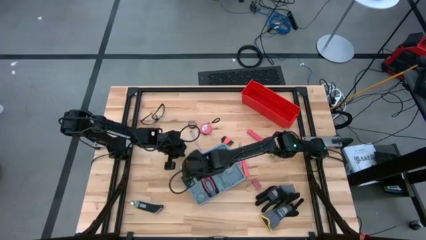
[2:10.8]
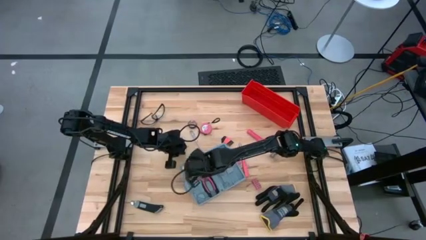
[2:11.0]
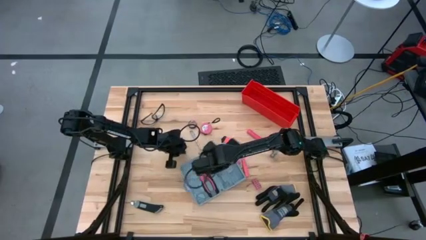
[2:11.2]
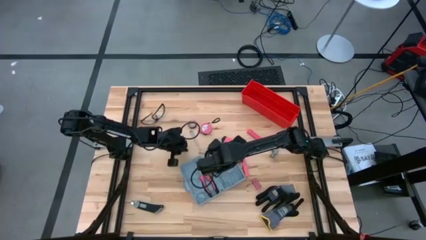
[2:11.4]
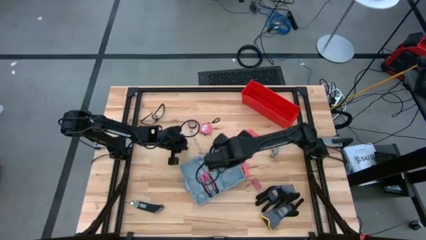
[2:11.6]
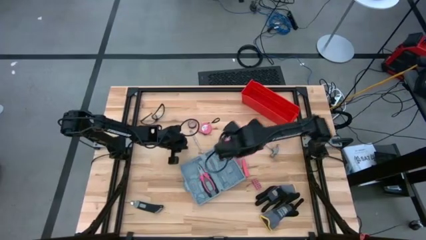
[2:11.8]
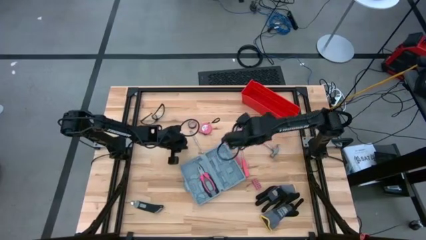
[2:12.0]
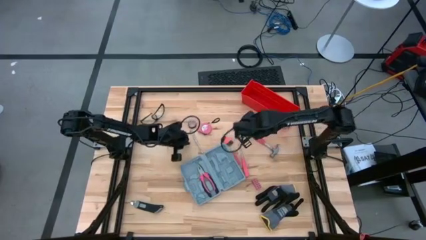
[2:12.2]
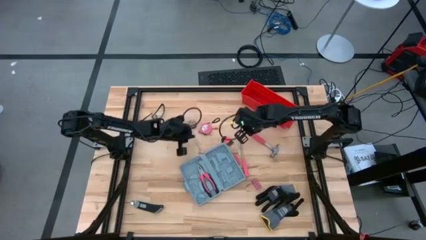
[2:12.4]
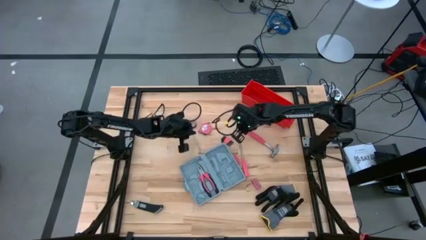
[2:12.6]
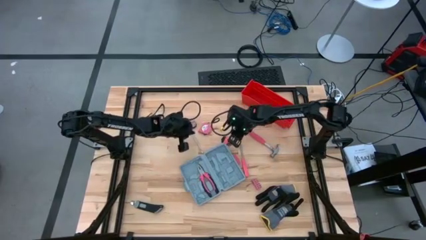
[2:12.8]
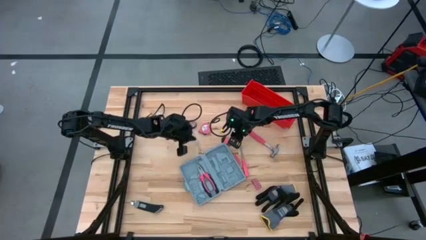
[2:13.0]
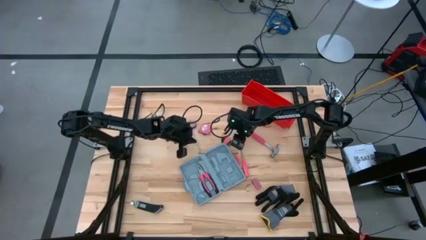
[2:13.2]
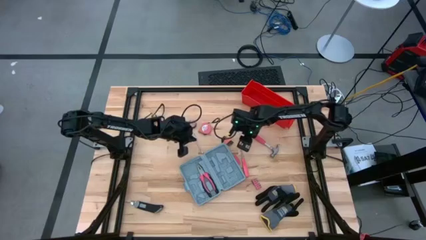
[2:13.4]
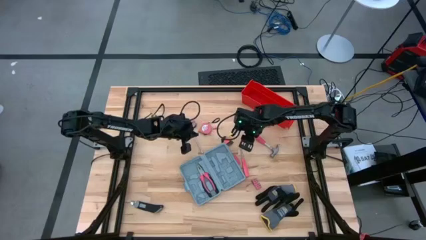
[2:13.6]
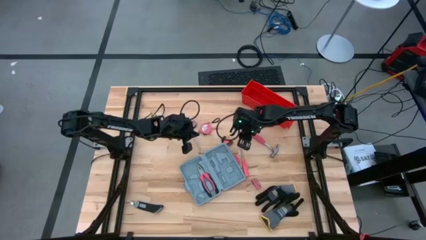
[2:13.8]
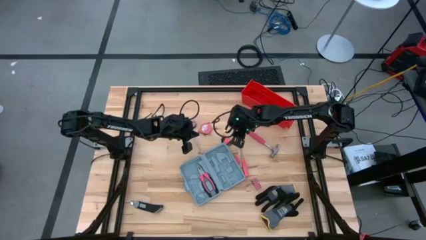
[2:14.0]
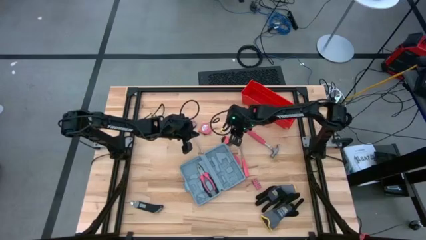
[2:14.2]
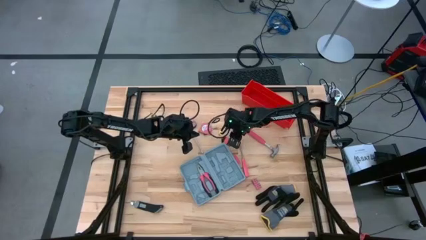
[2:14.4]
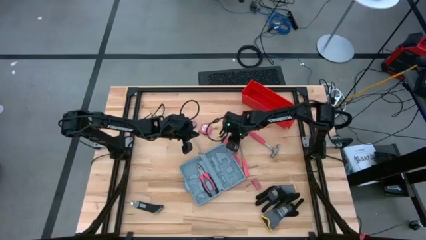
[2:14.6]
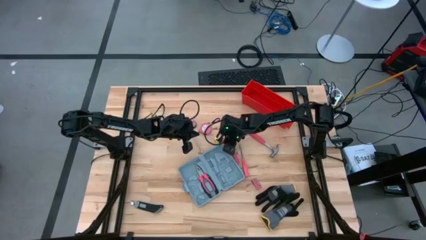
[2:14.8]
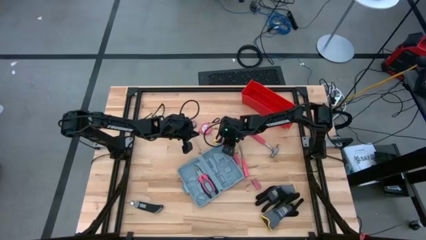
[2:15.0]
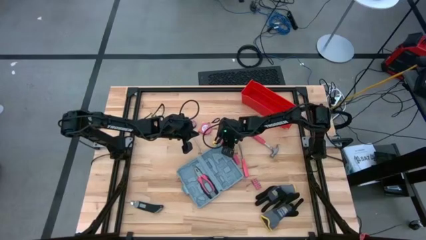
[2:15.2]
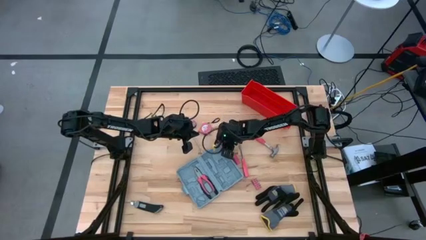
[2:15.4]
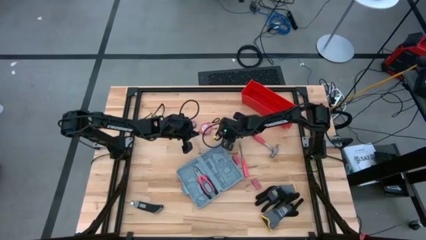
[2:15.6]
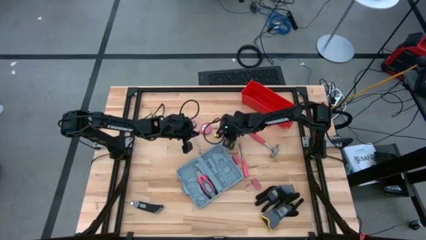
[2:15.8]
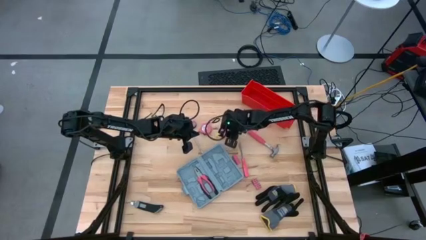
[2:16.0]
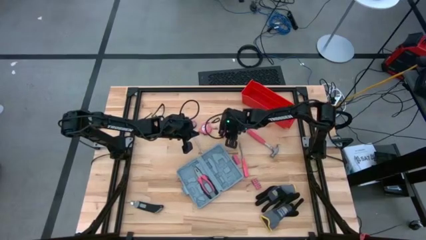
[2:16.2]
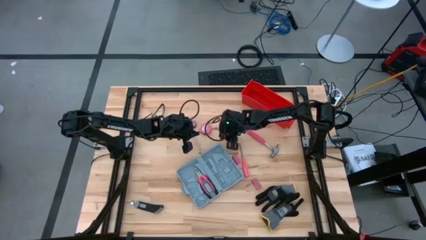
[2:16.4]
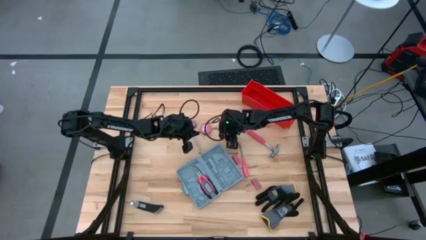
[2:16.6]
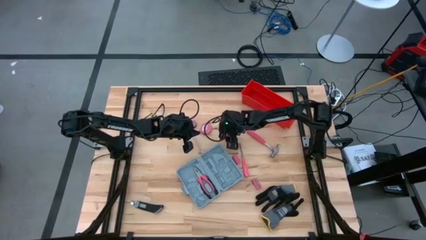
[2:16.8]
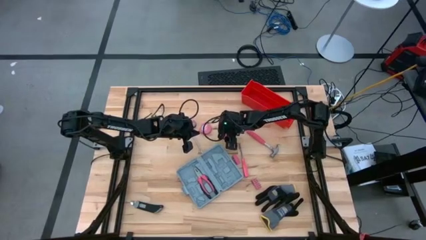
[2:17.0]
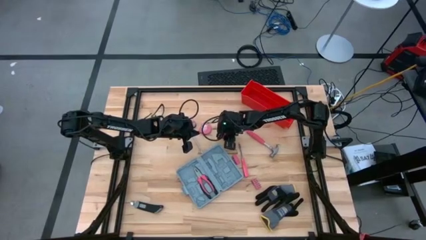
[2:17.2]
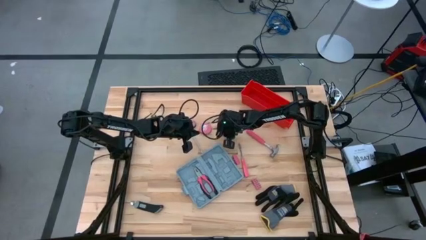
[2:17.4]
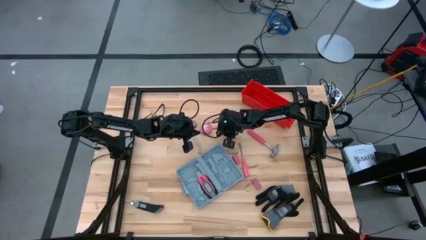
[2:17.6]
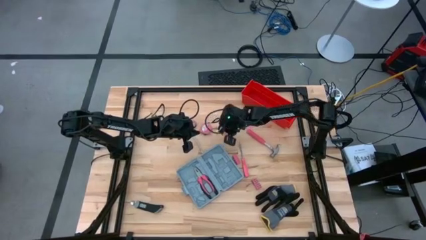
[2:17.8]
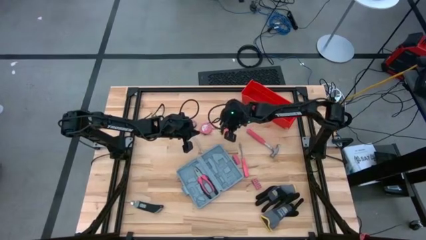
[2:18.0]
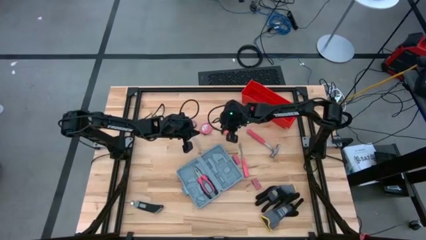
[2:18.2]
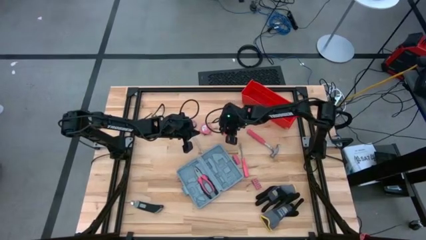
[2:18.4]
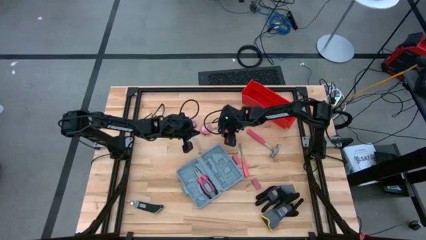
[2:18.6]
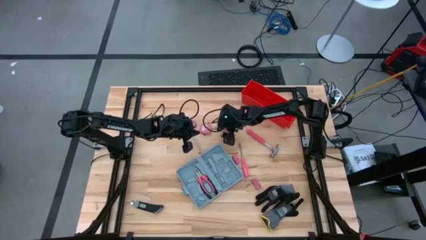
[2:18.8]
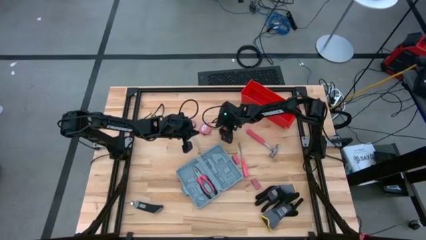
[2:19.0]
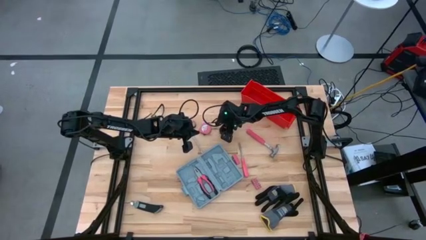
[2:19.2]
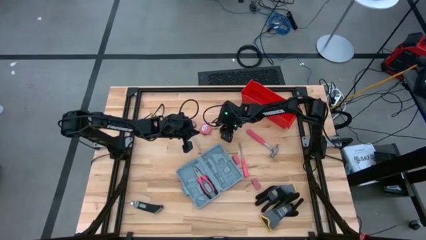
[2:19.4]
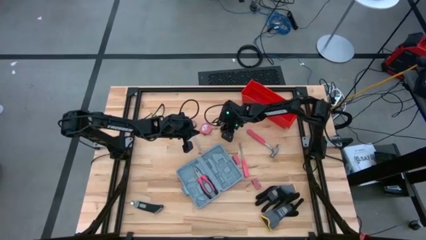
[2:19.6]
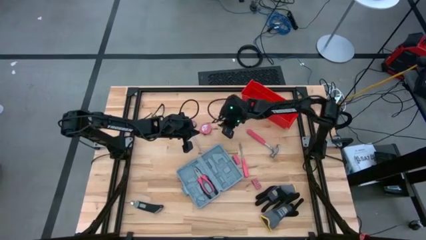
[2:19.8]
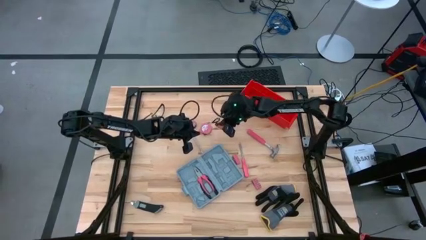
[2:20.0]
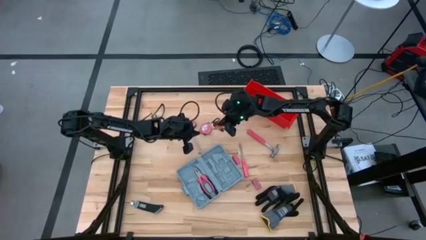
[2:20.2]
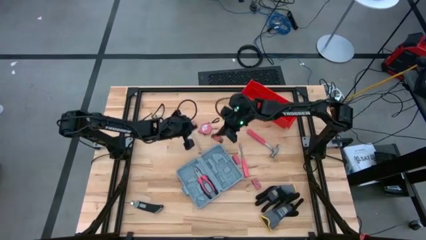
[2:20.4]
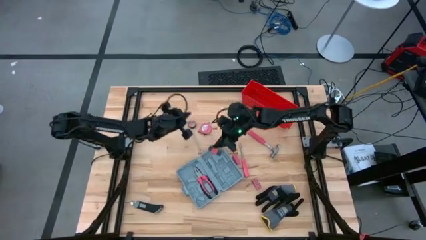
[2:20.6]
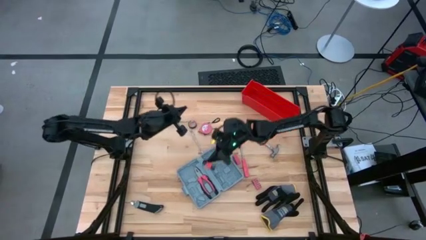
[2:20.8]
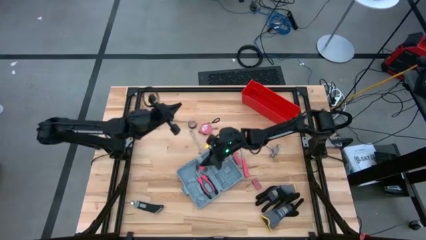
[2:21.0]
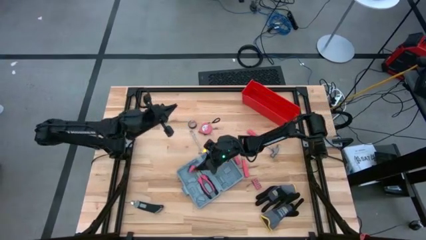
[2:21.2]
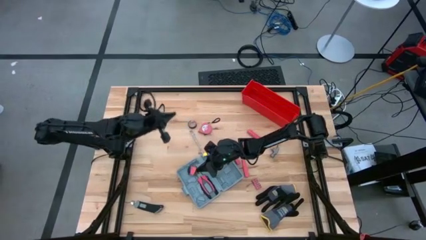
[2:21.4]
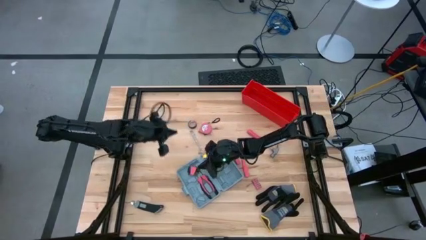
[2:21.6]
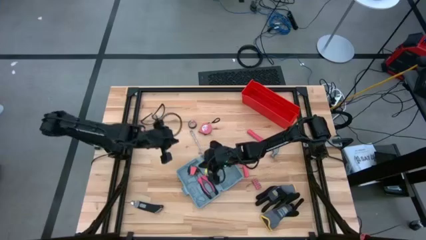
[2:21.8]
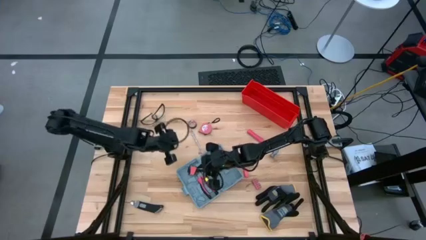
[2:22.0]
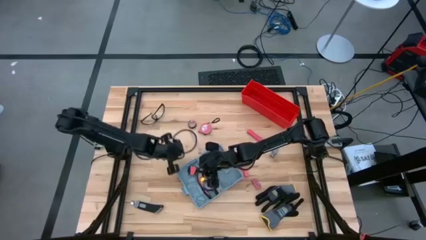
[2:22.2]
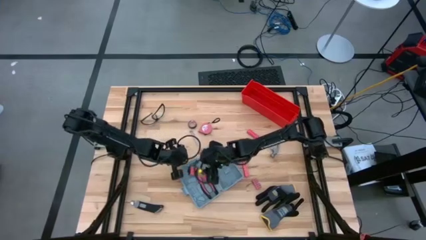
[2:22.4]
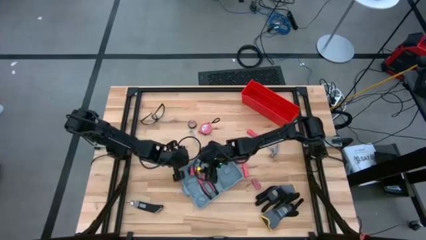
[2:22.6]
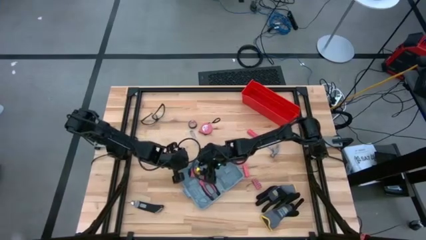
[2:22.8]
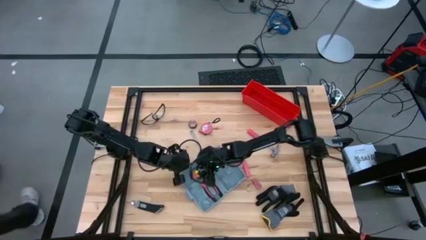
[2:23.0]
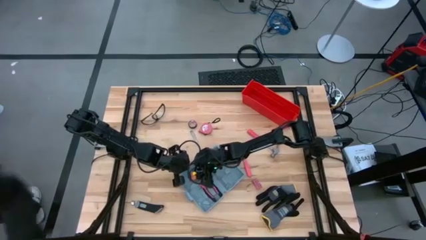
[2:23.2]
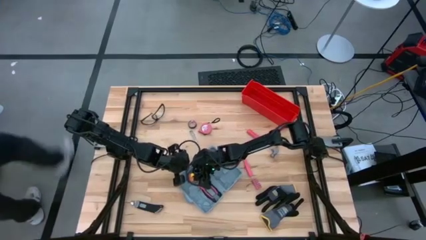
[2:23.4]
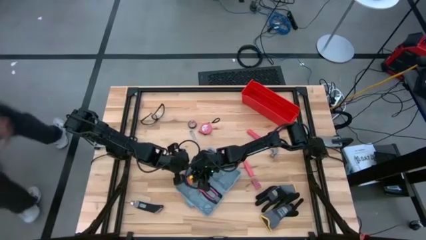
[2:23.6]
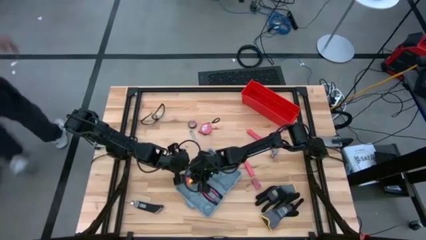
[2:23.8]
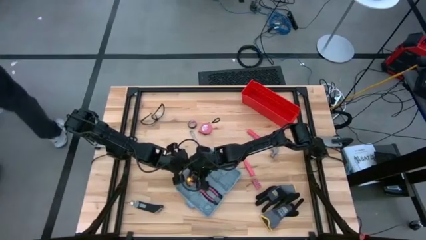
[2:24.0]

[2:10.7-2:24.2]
Task: prefit tool cases
Put the hex key set into the toolbox

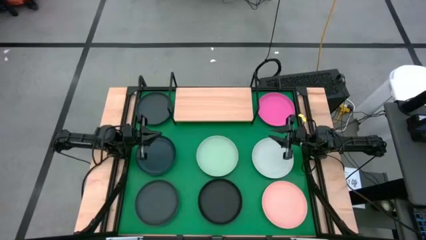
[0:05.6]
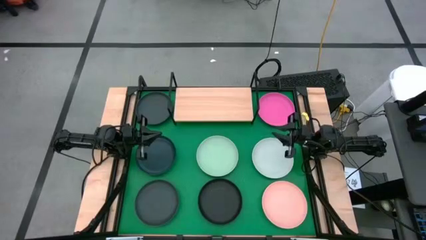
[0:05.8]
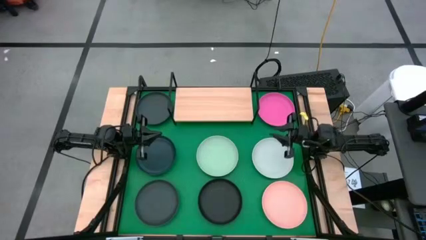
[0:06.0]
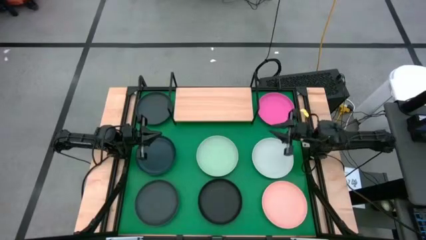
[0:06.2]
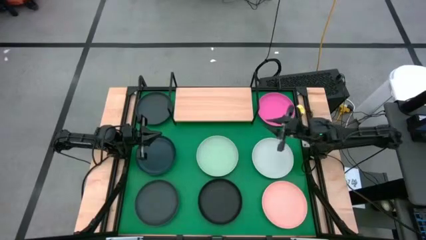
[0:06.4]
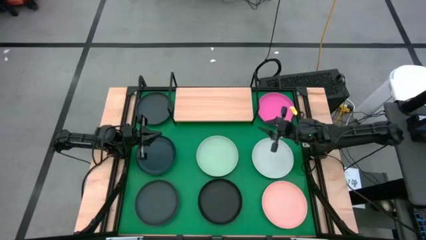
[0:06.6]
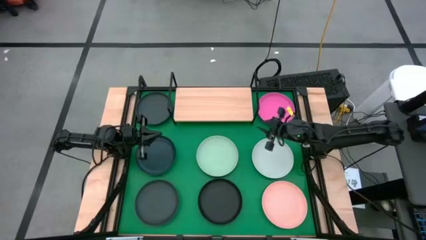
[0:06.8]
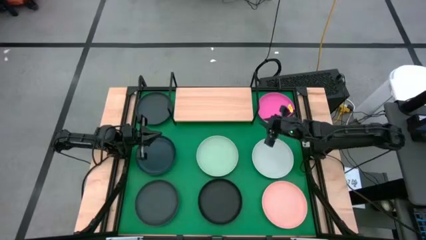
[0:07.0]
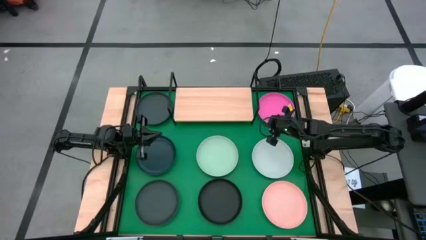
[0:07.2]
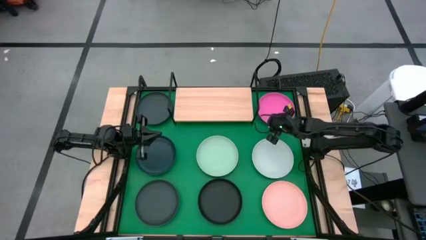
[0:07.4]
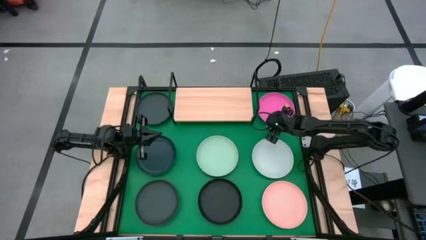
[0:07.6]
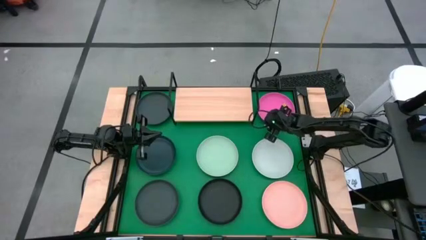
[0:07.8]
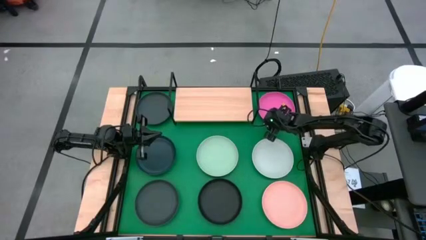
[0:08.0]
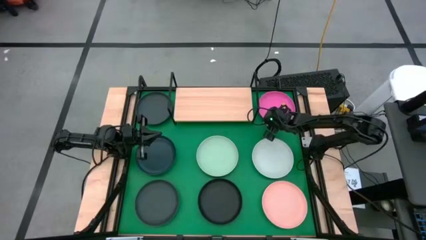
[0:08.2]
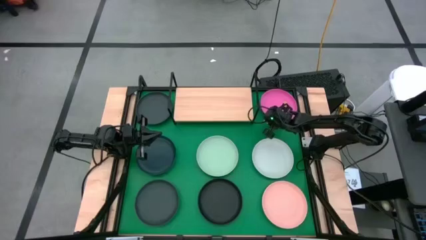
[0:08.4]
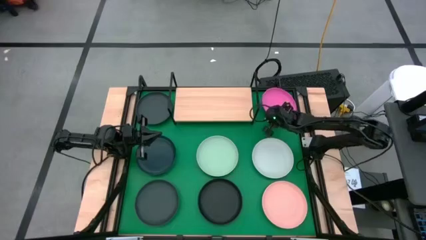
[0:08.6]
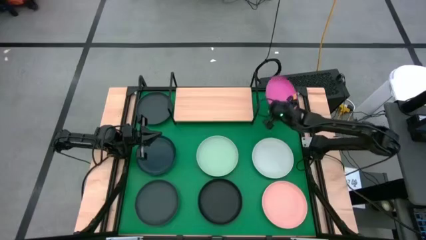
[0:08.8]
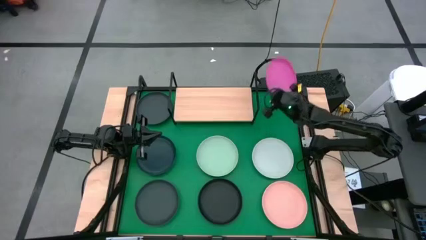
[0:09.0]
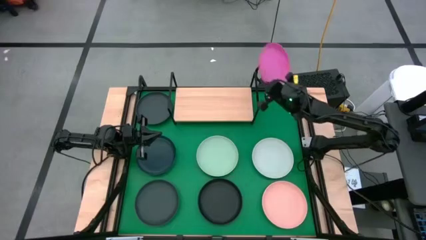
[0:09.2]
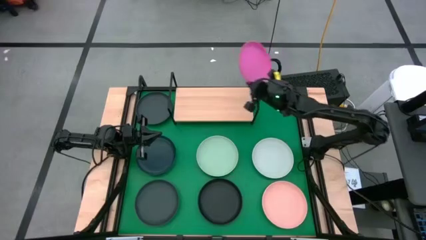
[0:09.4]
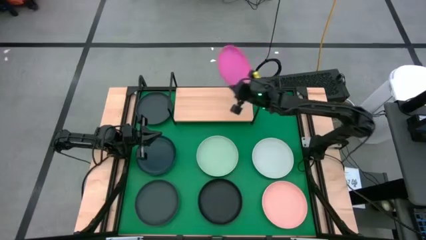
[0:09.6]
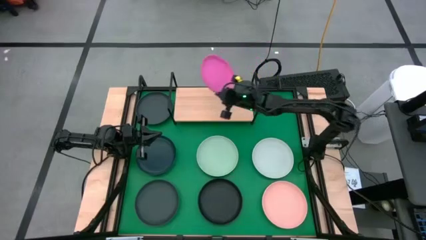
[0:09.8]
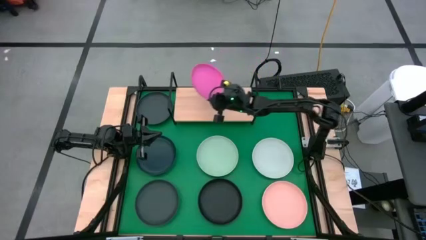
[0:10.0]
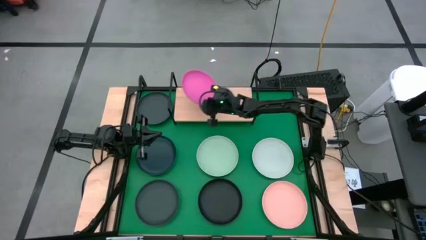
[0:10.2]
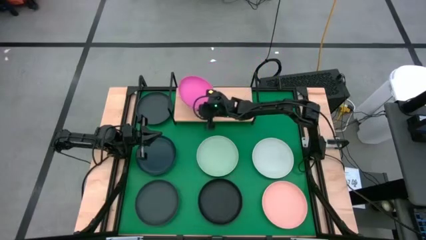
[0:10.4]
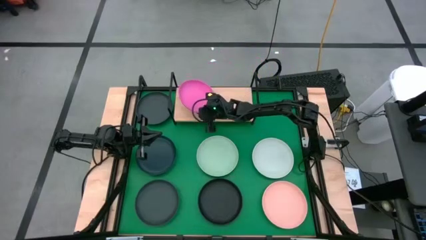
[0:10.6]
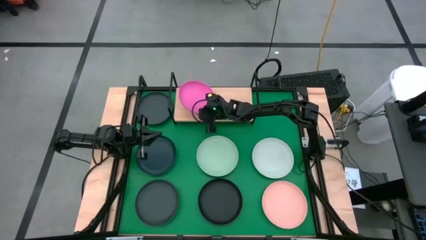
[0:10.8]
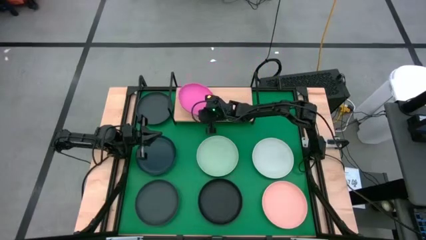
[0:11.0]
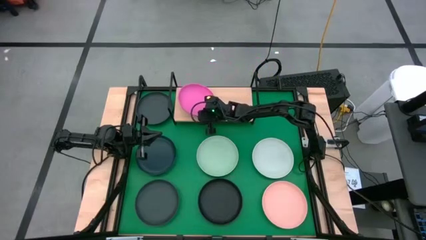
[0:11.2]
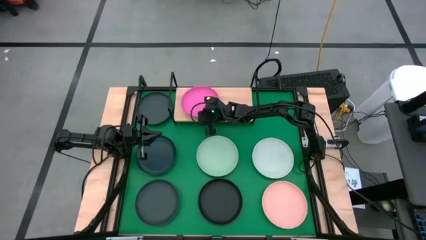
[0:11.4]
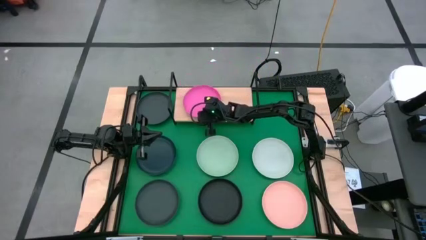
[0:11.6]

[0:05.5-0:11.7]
Task: Place and stack plates onto a shelf
Put the pink plate on the shelf
